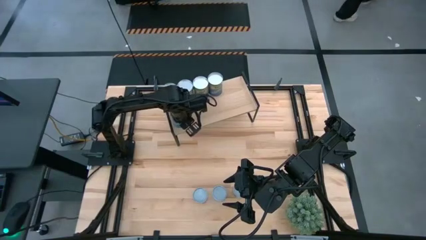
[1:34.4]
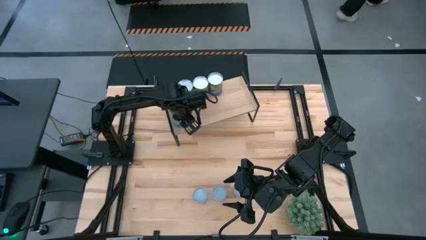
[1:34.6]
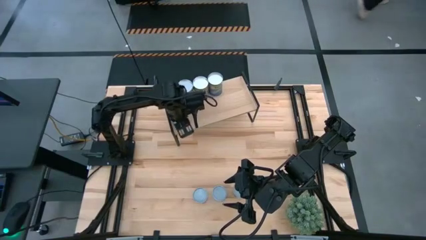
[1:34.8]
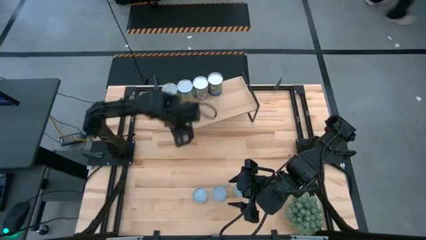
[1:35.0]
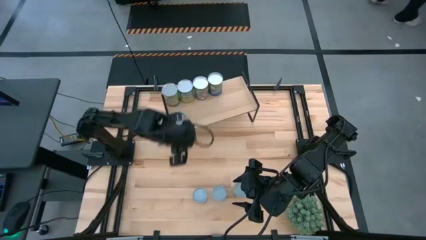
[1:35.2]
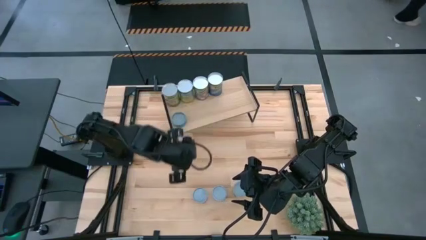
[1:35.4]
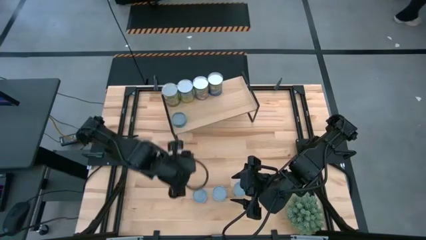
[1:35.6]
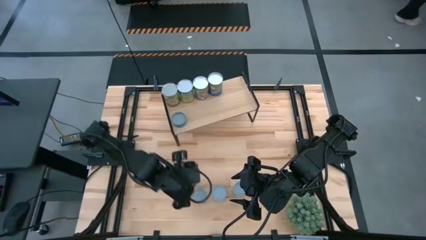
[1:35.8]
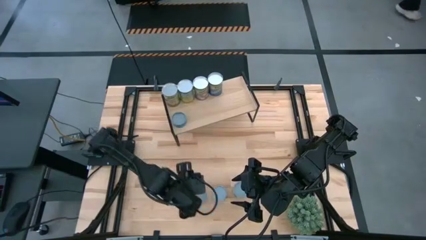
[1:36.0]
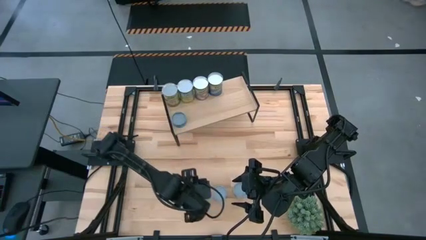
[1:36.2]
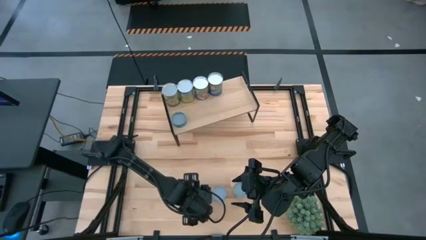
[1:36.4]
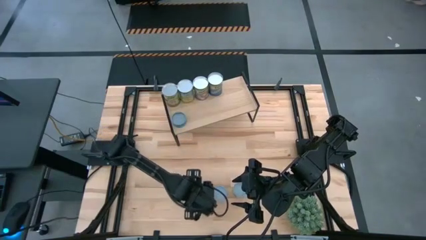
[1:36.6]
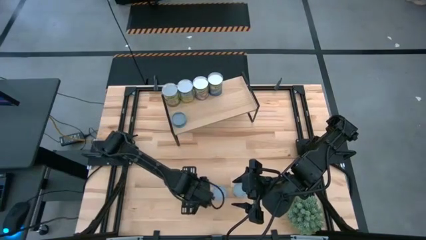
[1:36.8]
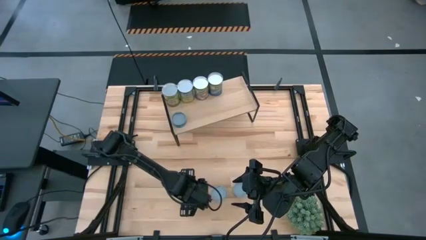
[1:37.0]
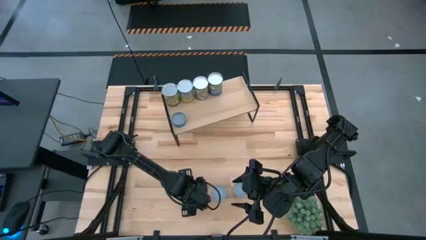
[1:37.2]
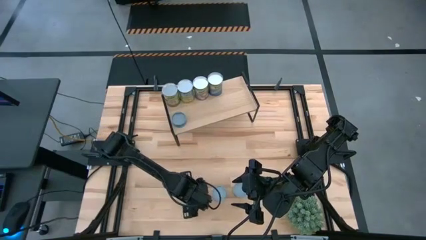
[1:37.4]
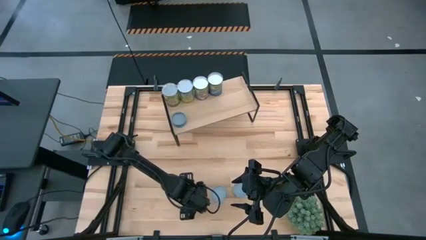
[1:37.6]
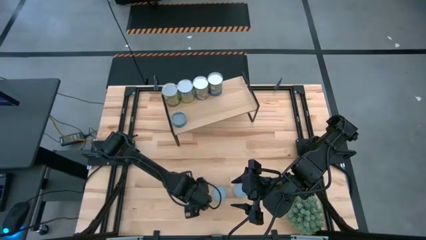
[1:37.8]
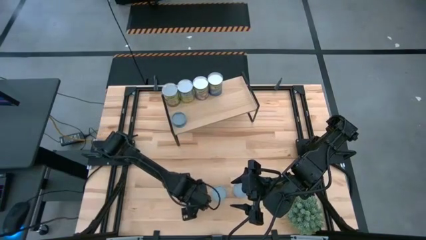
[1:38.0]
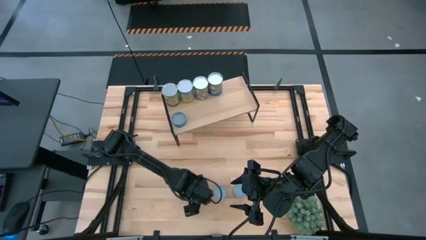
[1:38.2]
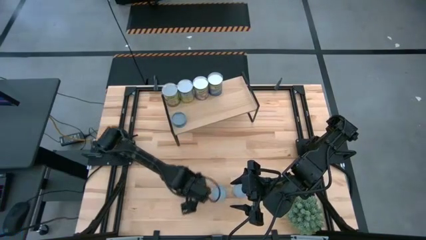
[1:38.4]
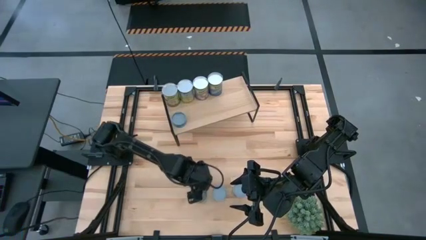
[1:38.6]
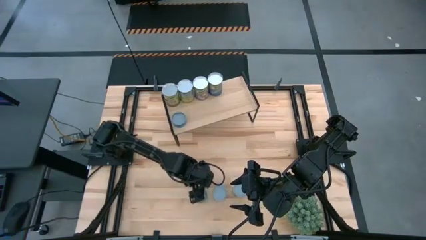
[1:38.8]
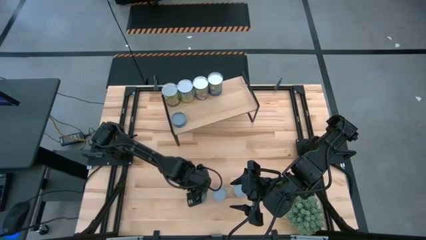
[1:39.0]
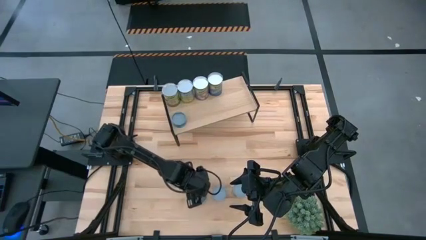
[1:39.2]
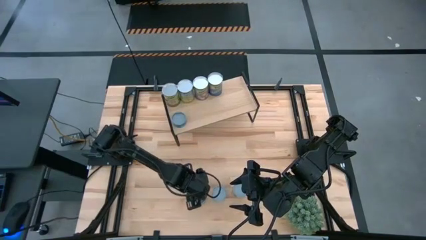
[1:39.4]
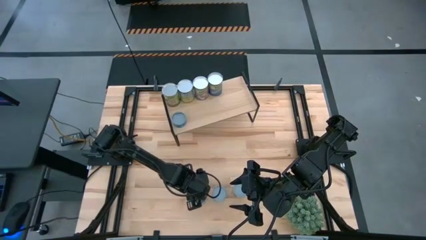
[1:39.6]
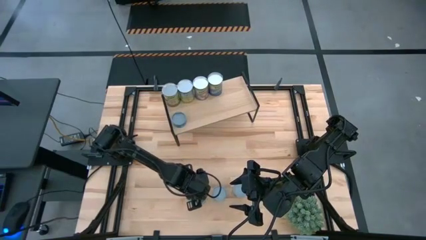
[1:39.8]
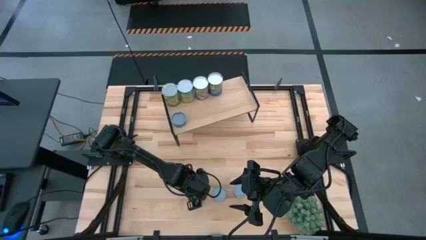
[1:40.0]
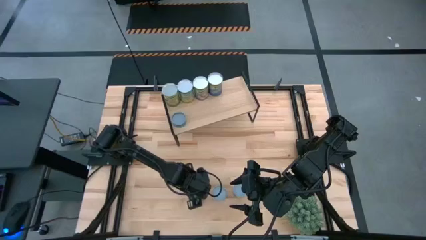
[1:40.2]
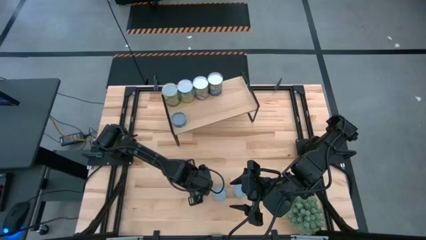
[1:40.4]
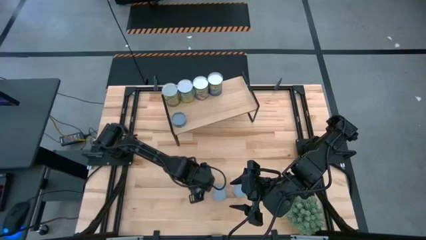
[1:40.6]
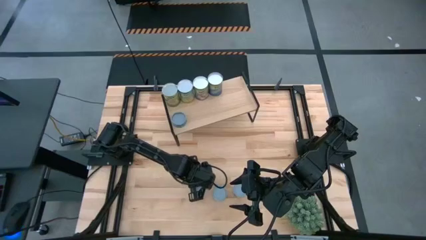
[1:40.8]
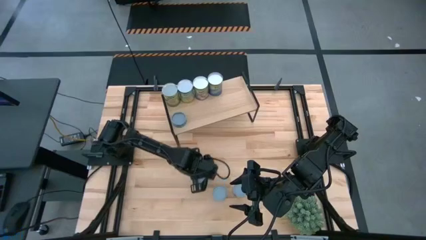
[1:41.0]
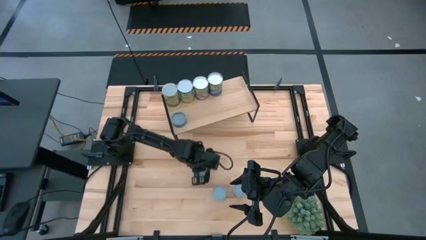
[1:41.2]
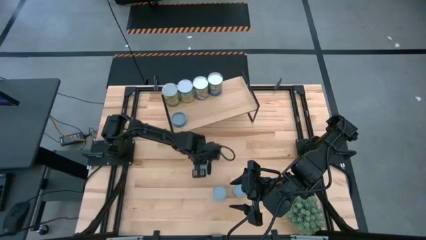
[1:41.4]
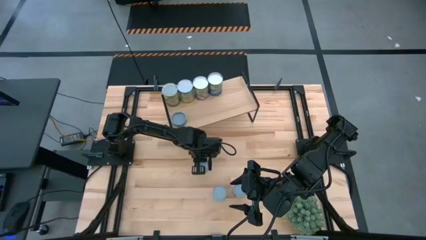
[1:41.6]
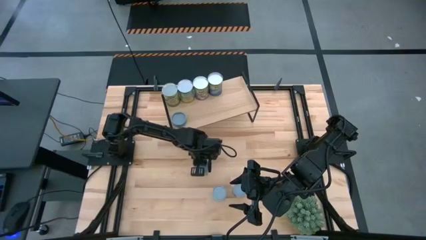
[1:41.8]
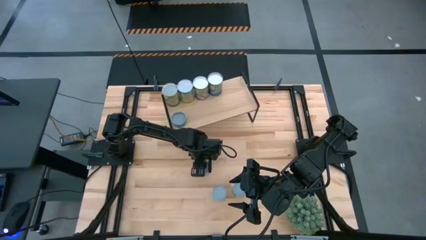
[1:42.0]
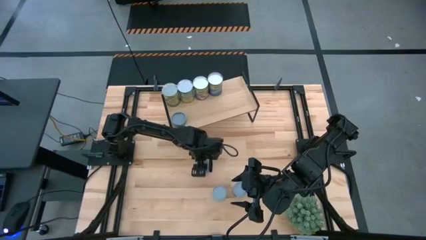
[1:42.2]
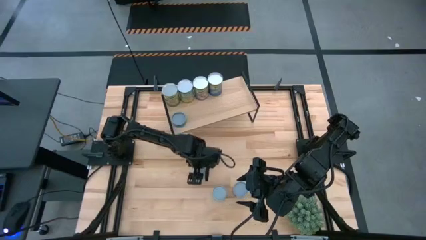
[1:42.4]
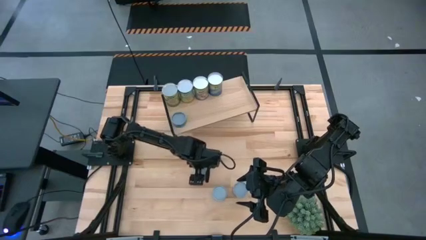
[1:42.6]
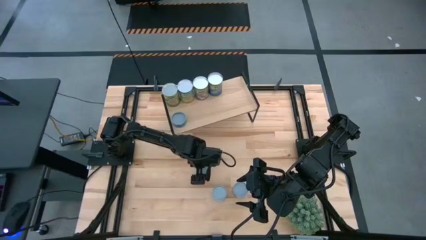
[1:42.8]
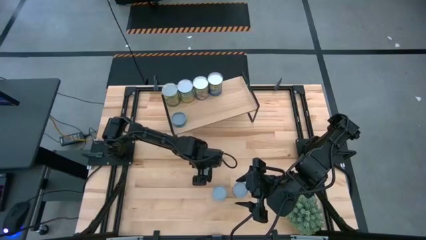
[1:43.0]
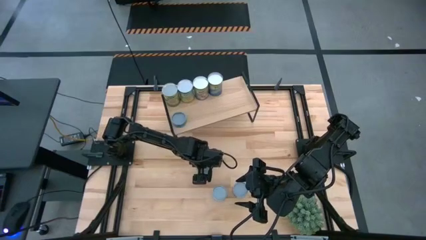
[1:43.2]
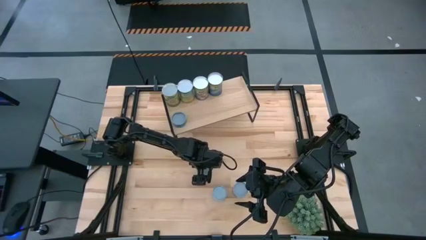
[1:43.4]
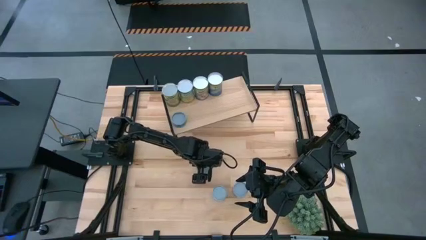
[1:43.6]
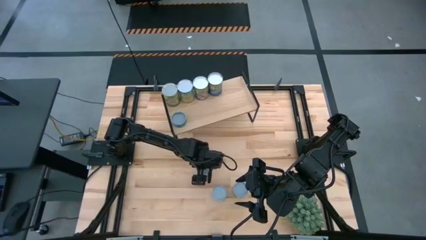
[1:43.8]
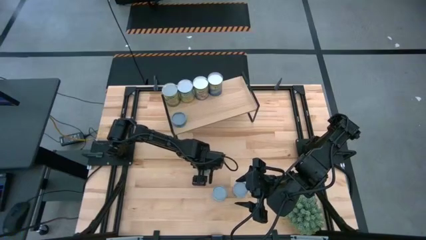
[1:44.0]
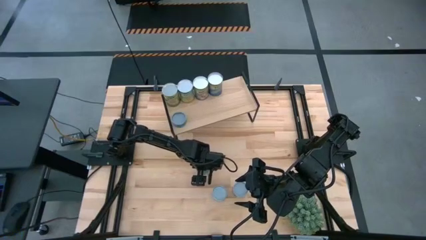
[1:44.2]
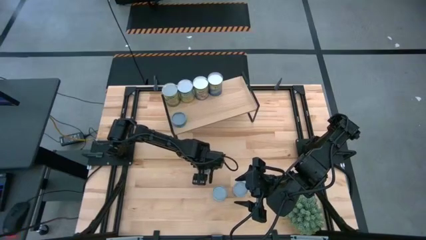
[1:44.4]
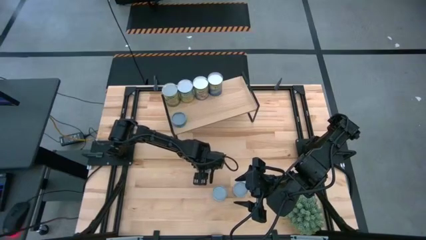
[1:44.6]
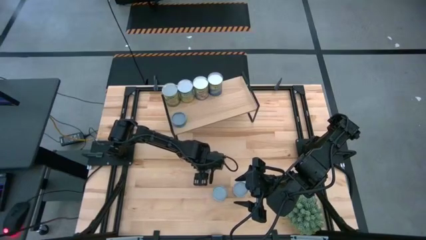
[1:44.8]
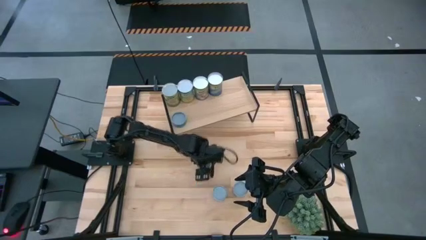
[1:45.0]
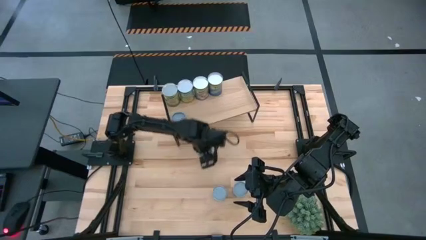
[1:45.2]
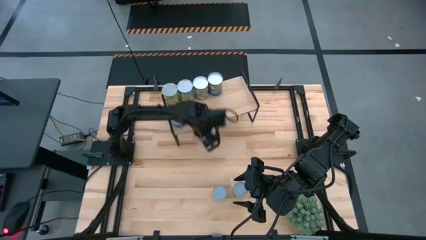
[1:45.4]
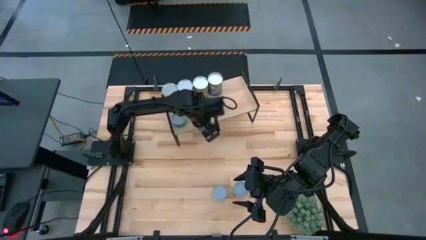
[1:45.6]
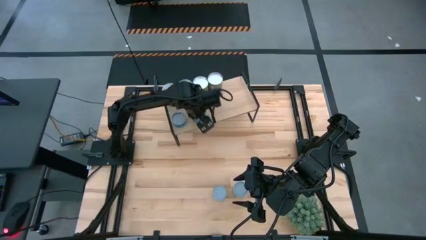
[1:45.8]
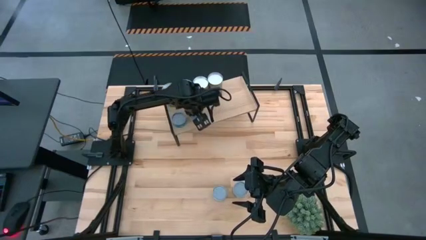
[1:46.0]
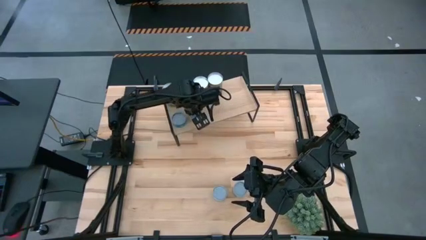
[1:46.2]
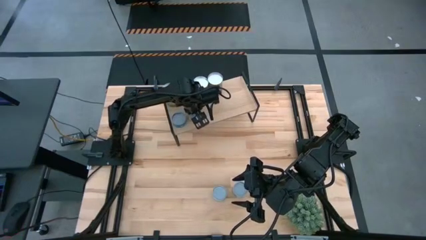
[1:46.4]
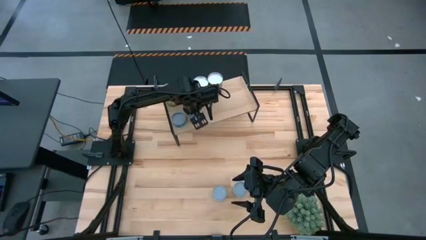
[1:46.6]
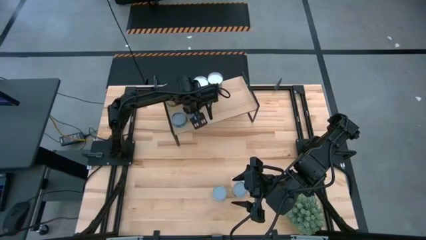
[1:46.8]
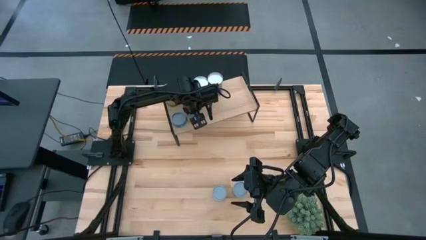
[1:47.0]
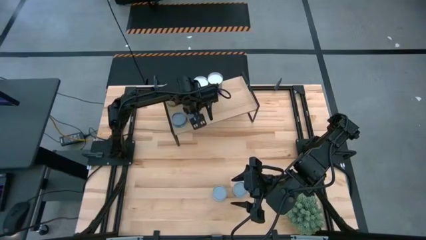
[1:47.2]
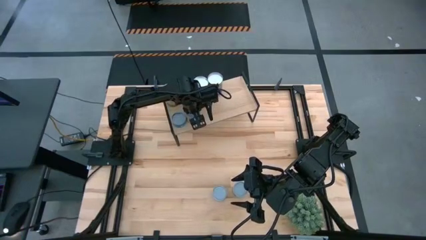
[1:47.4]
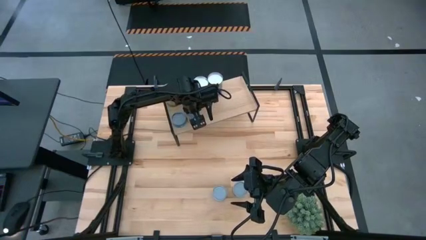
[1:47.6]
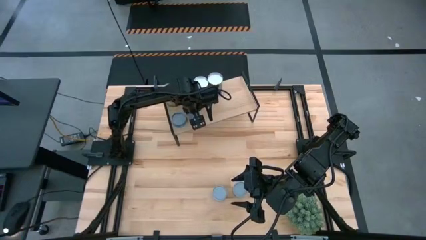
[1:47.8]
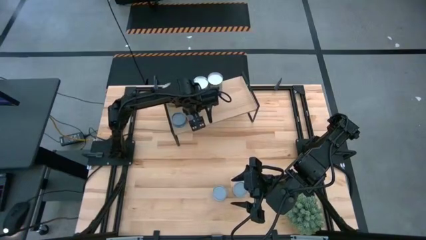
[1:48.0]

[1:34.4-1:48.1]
Task: Pick and place cans onto a shelf
Put the canned tomatoes on the shelf

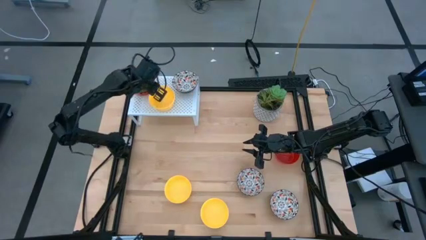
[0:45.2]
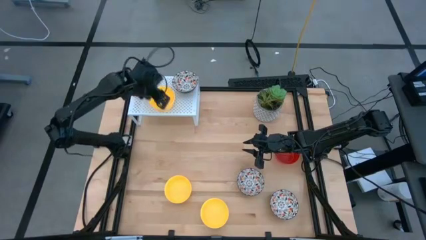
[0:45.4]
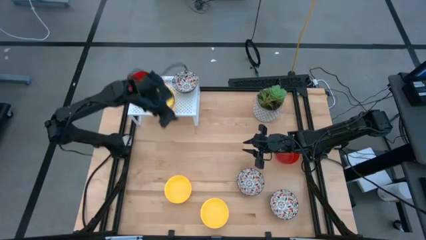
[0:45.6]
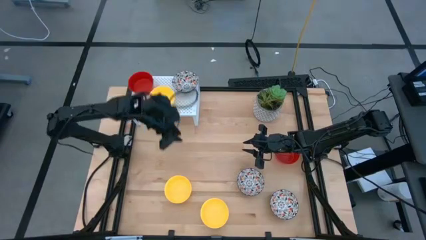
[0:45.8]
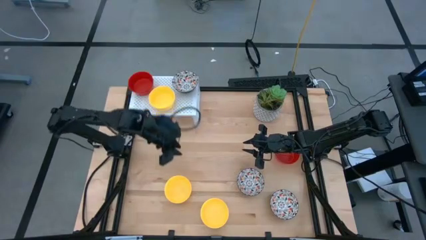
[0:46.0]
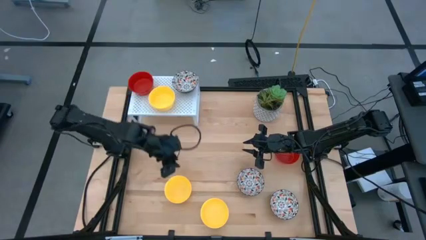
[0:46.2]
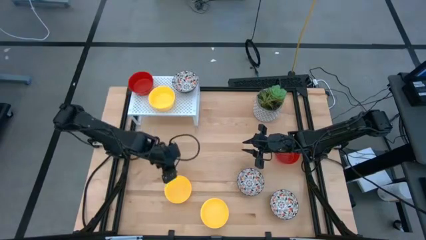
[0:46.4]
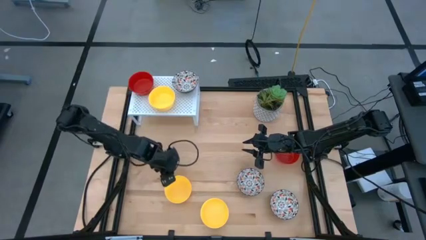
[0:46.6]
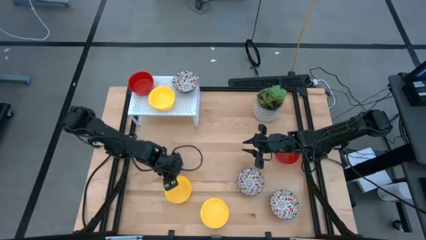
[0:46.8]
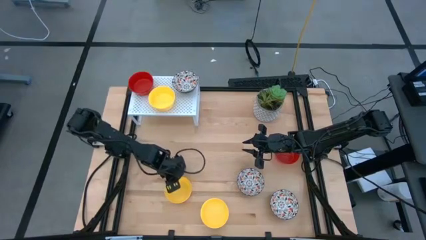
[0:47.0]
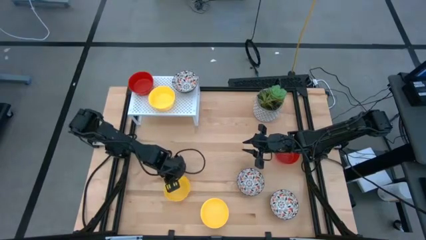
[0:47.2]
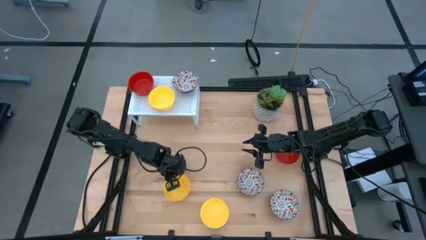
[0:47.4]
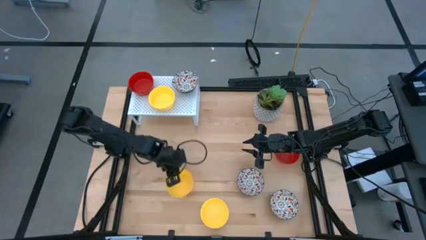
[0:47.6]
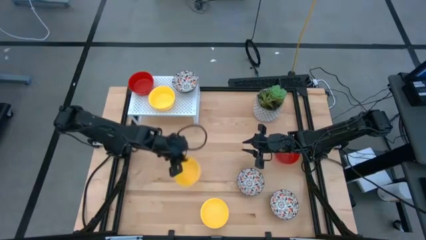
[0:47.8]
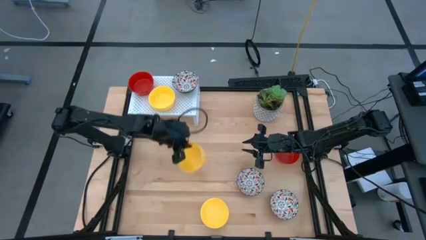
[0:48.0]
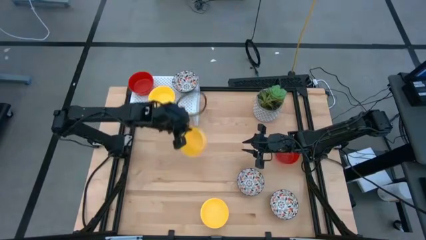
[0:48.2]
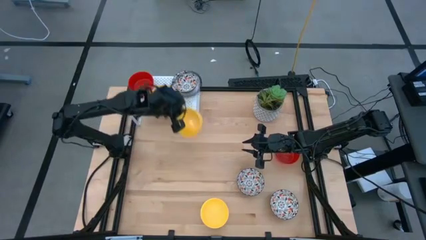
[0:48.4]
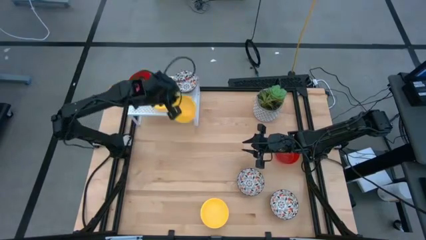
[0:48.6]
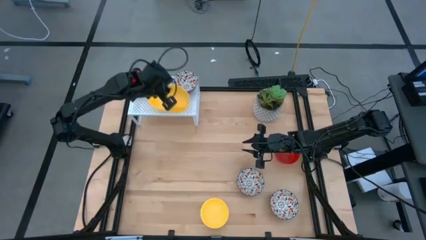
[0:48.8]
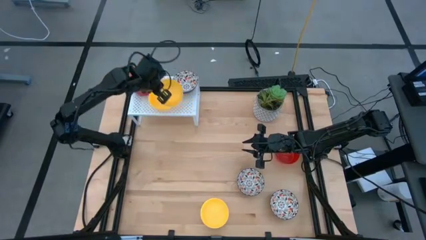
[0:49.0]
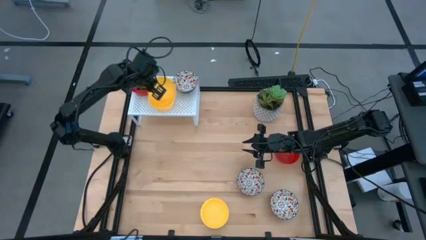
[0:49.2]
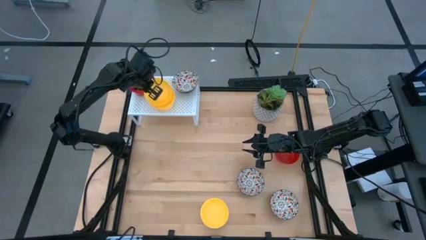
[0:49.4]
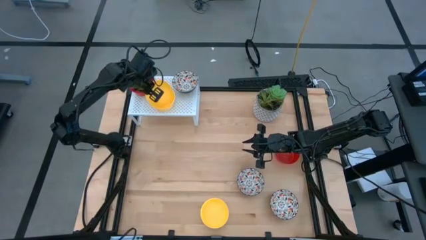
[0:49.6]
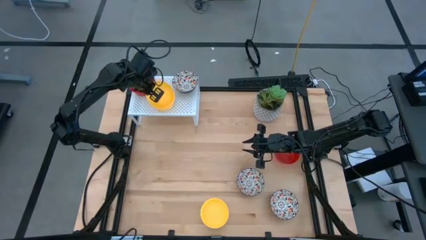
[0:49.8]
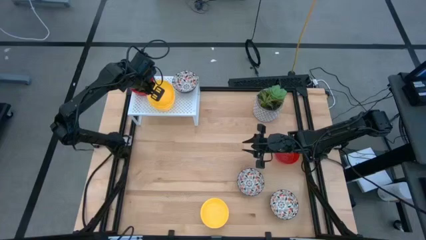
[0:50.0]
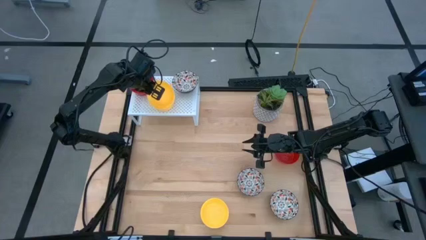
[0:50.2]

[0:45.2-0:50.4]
Task: Pick & Place Mini bowls
Stack the top yellow bowl on the yellow bowl on the shelf
